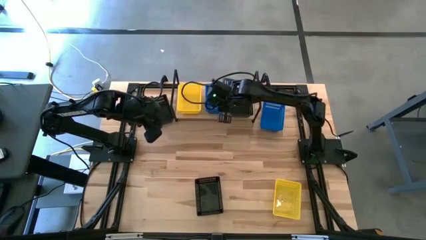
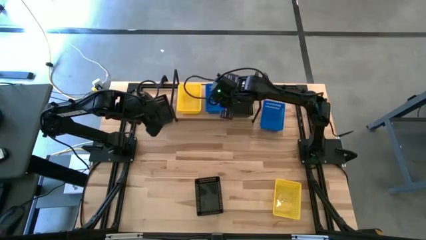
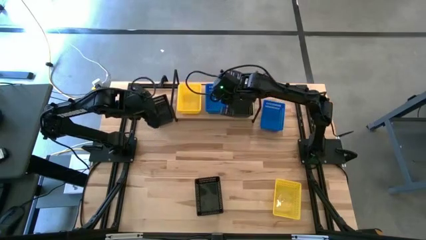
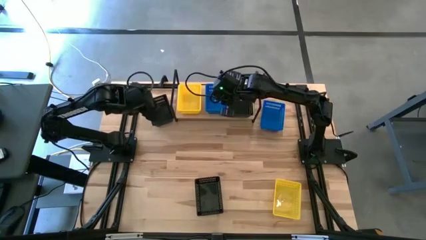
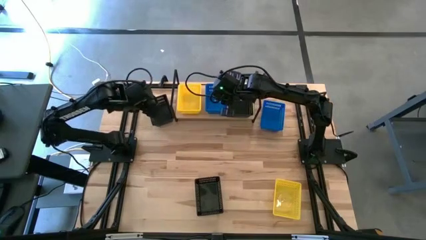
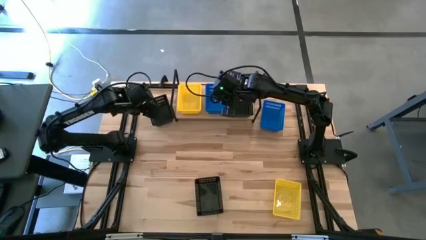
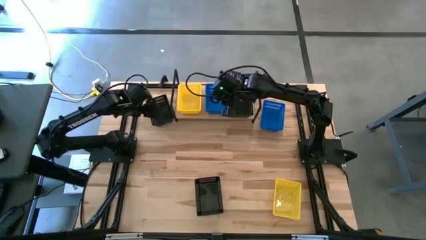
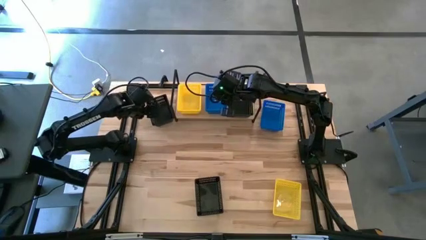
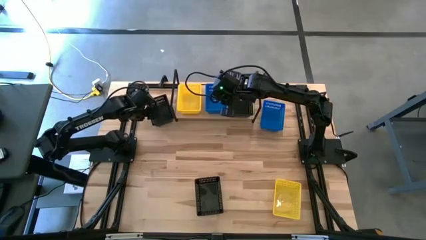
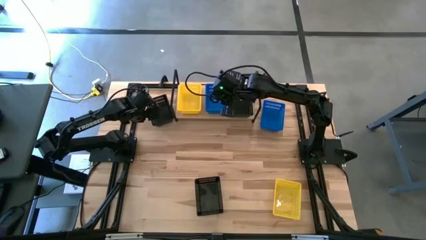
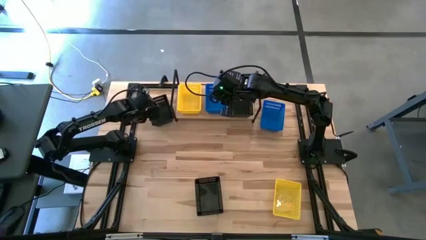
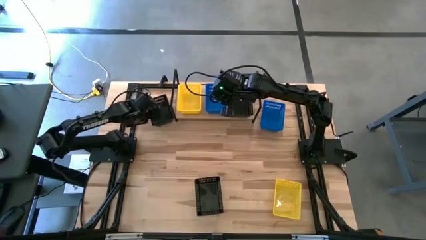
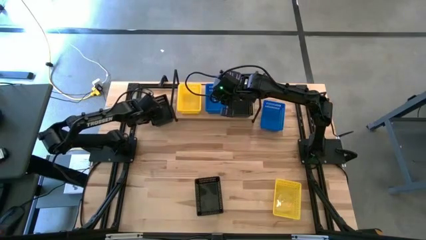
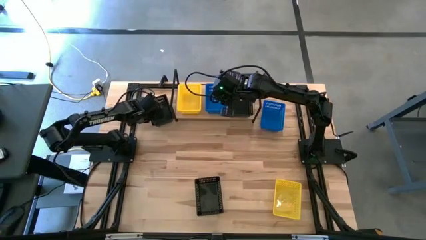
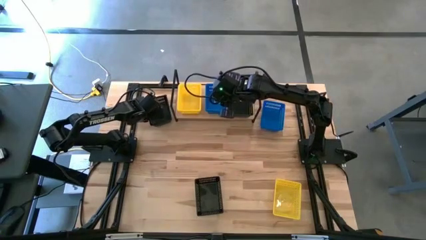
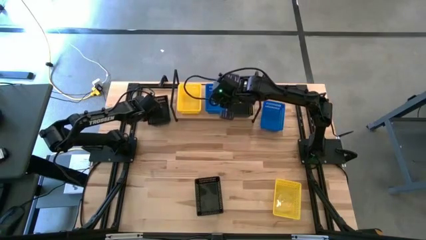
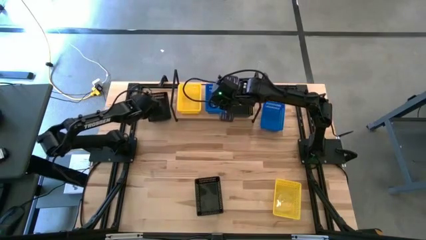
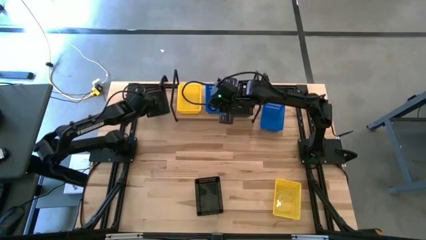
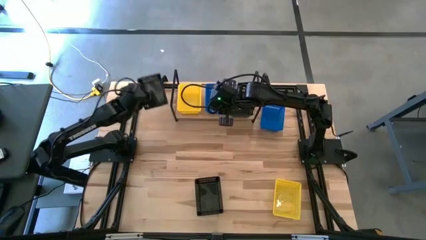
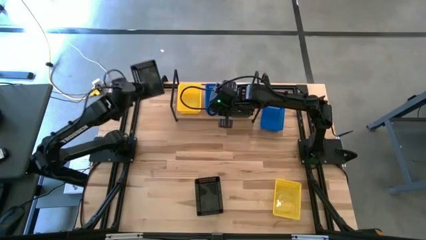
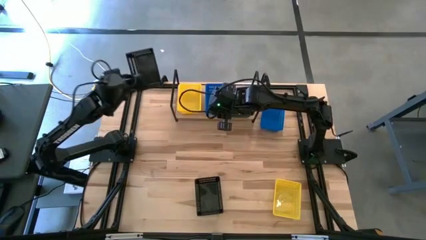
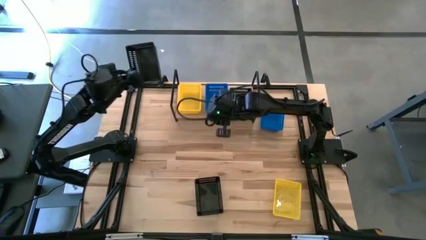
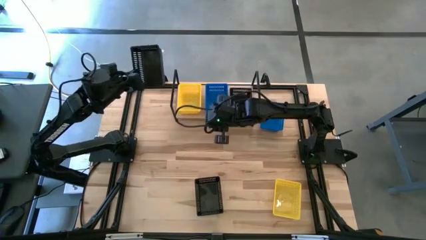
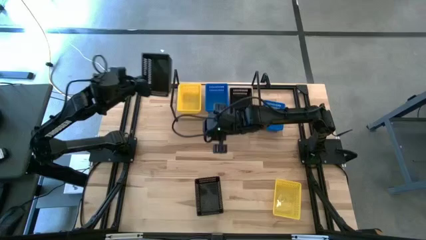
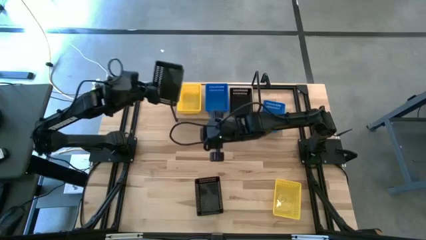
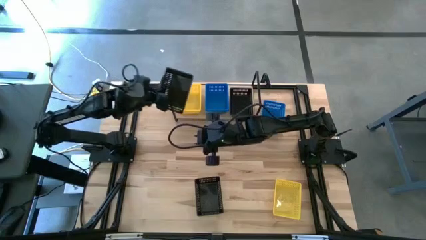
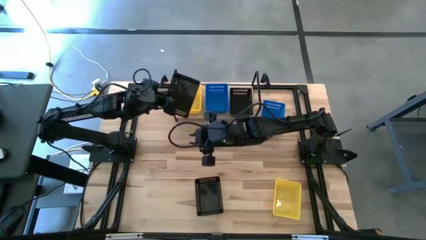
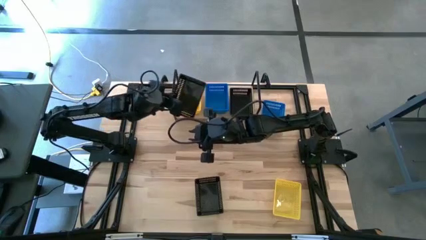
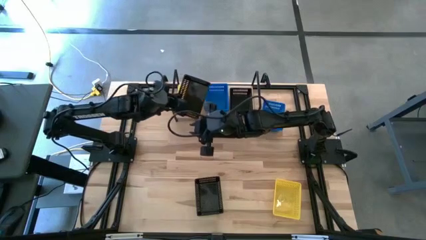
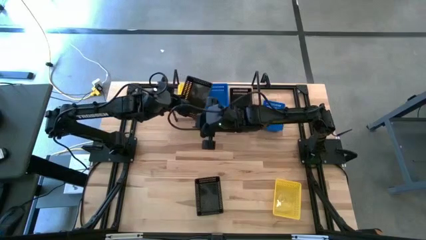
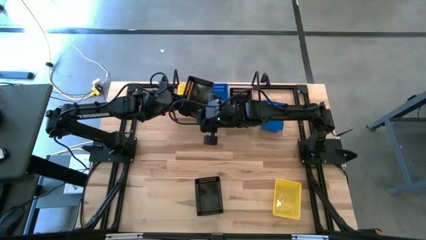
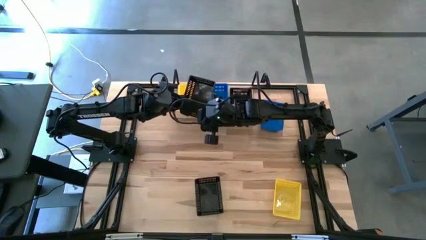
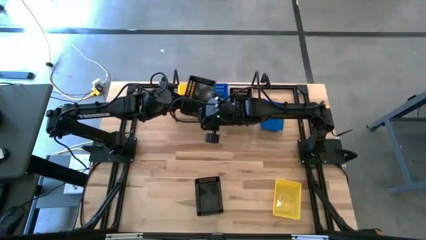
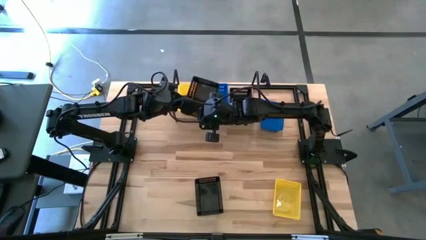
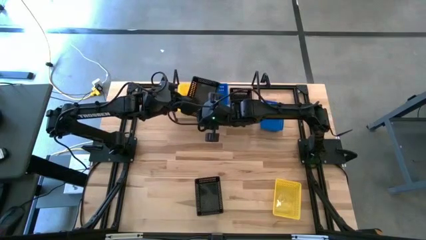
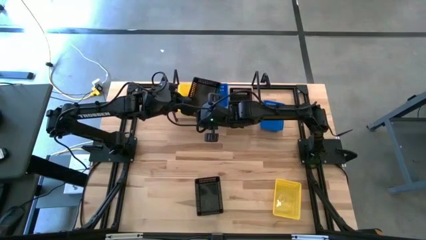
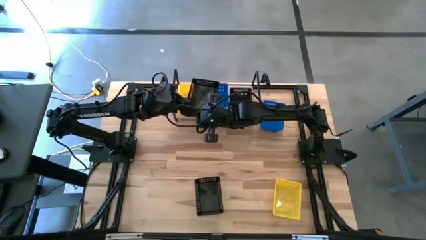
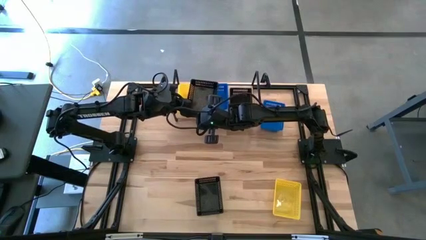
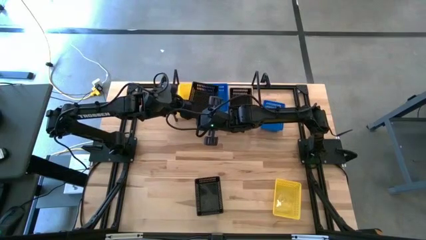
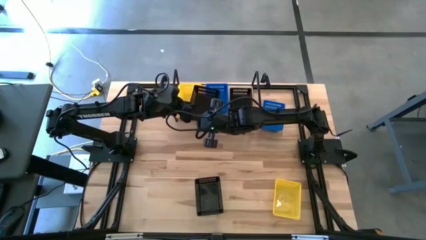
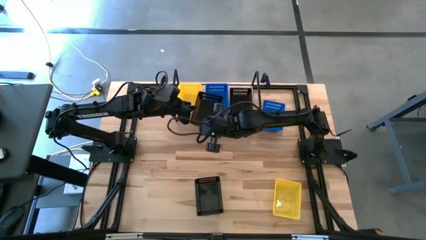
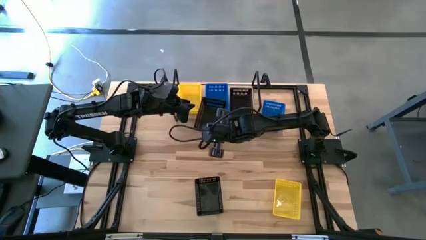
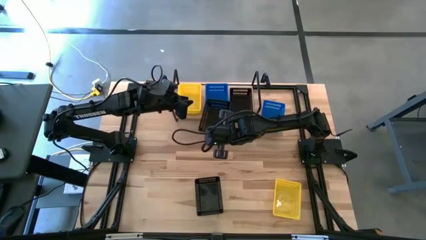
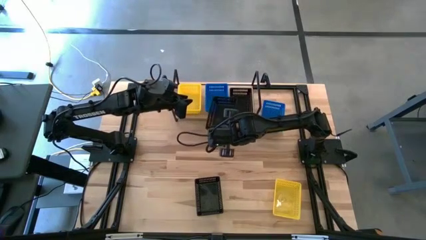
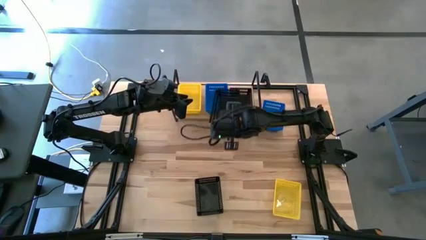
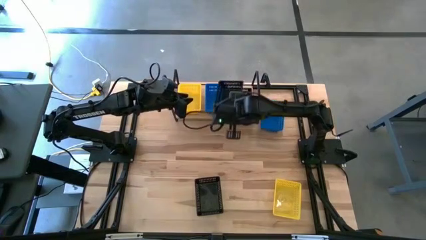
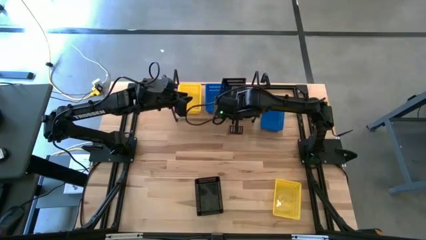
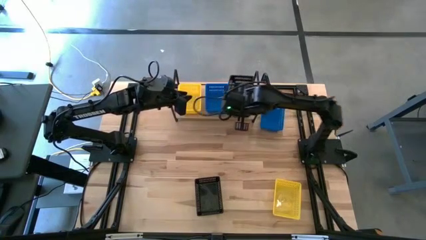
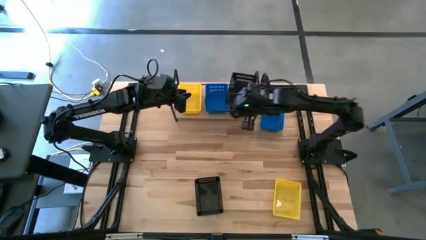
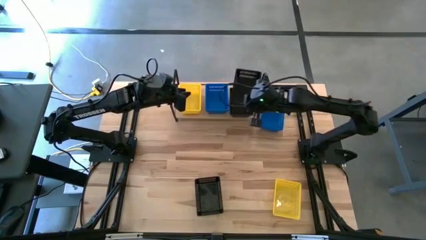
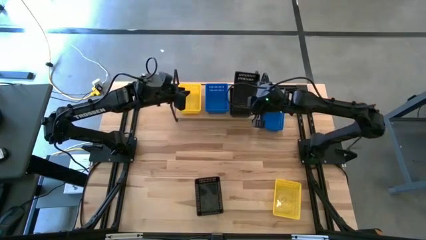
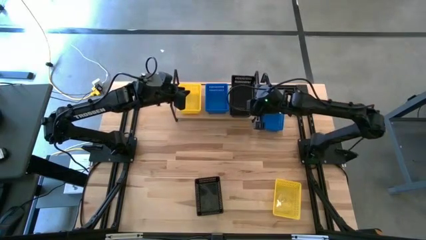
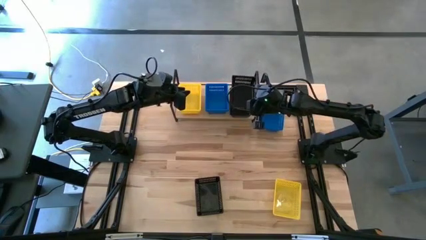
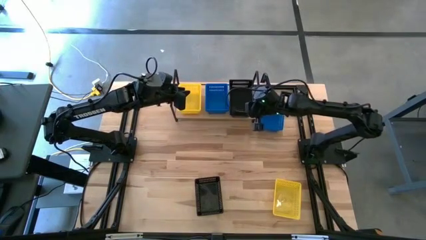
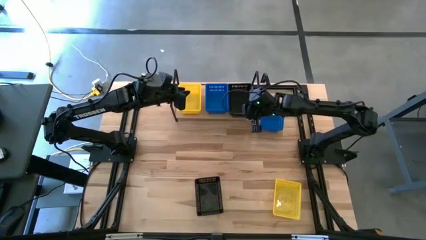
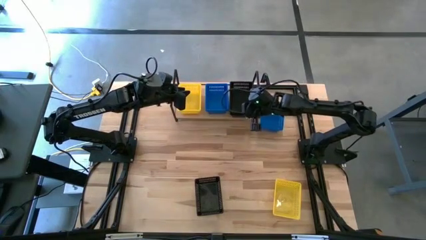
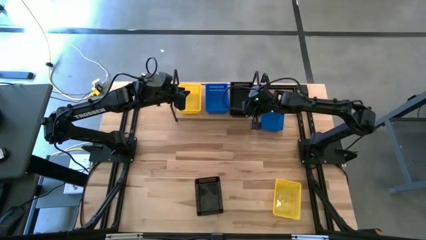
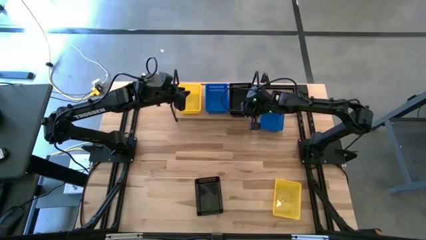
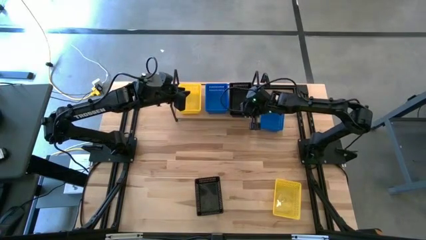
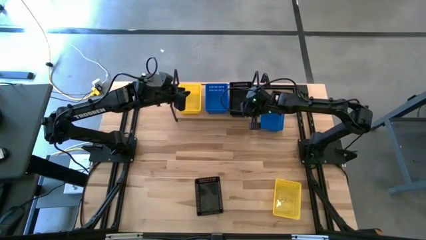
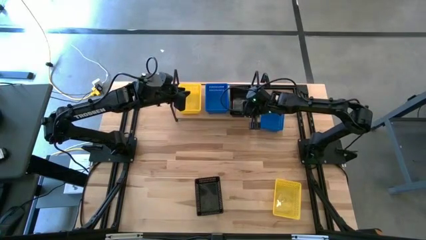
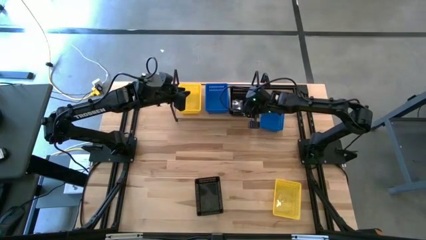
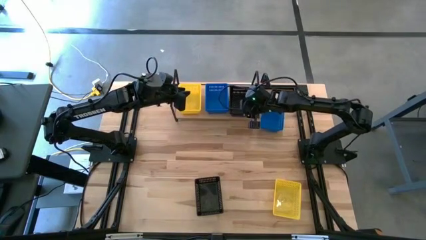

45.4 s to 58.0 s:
Task: Stack baskets on shelf by color
Stack the top black bin on top of the black bin on the shelf

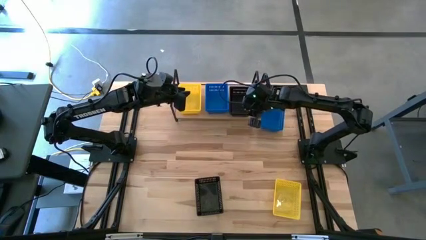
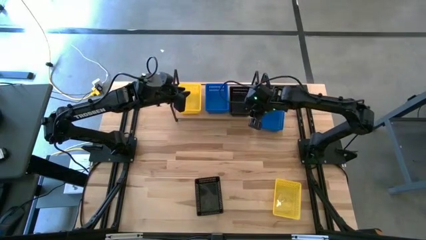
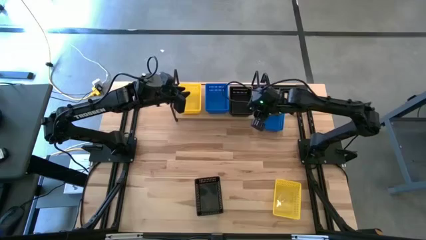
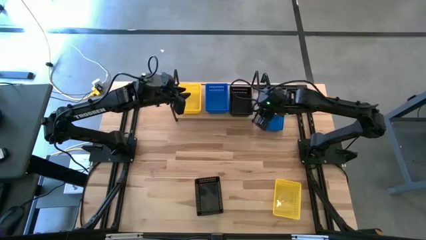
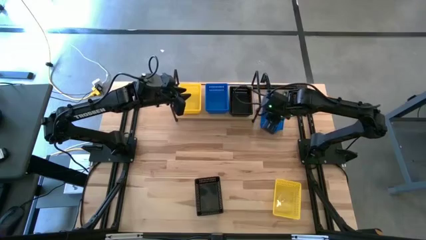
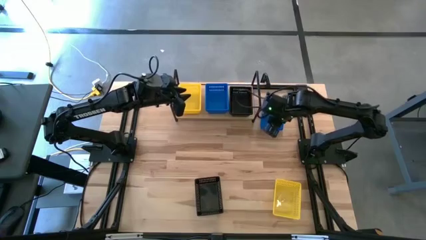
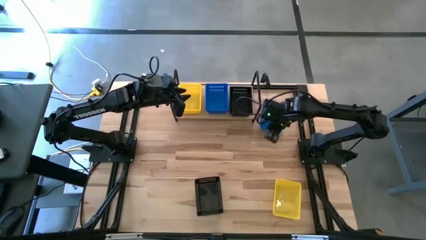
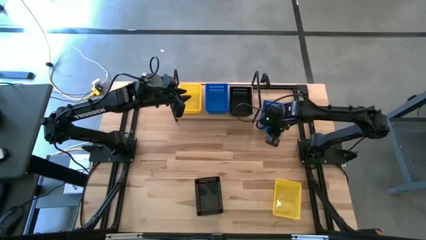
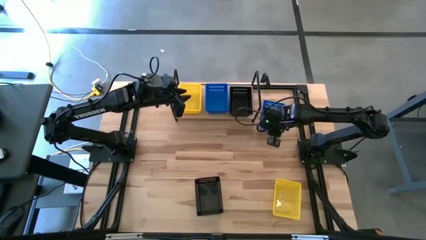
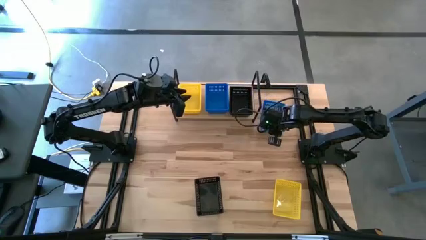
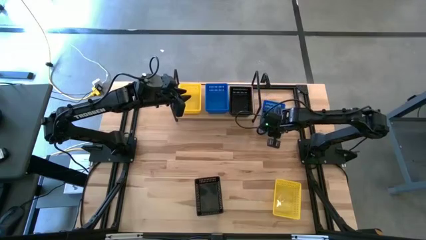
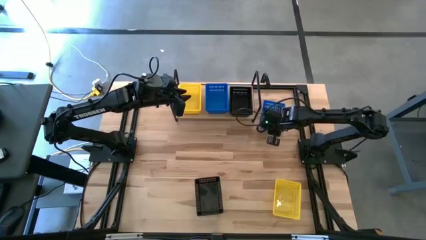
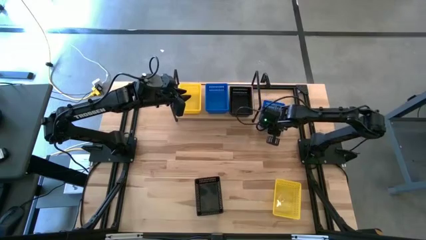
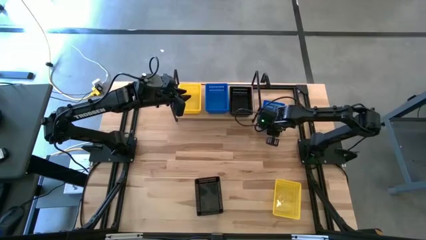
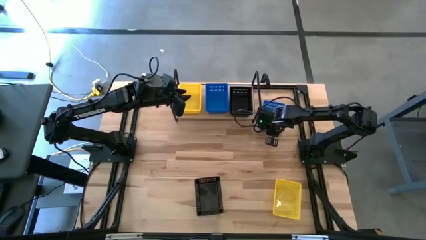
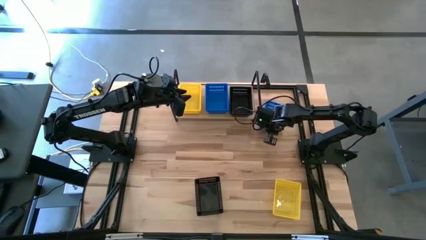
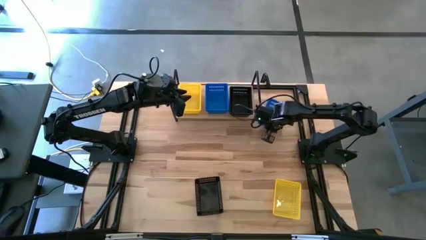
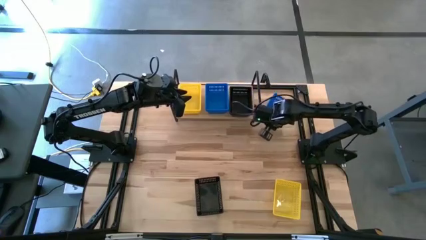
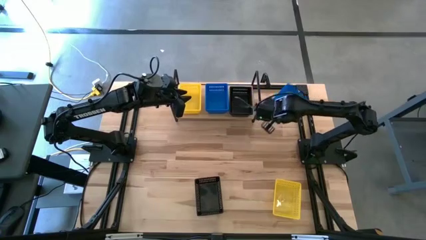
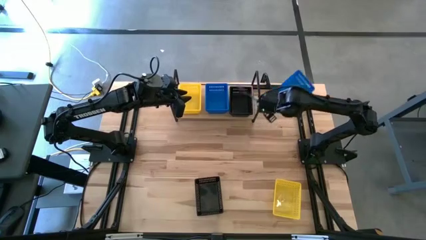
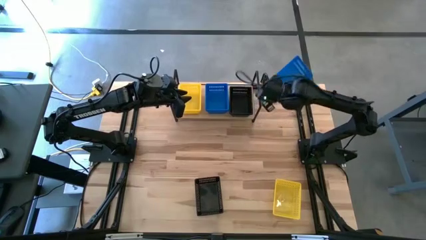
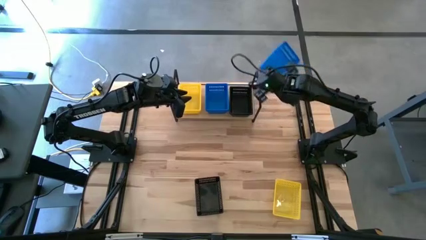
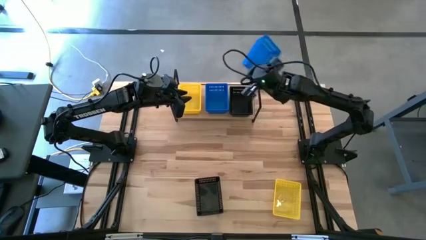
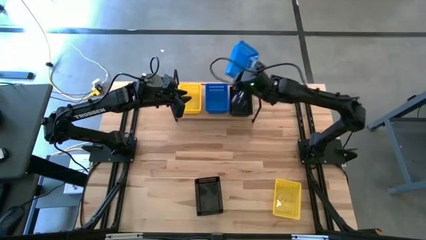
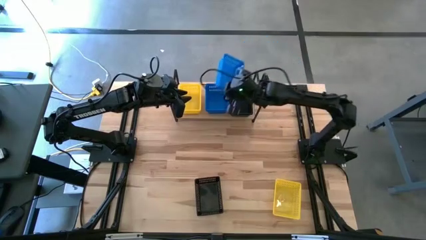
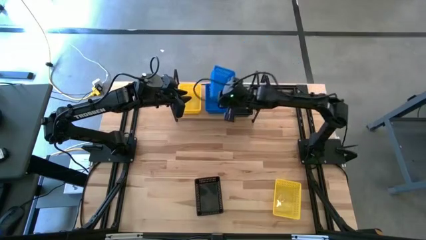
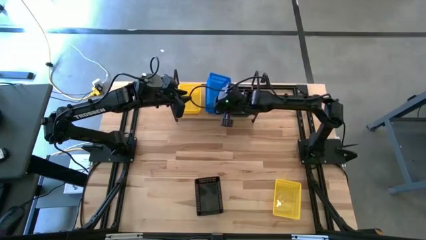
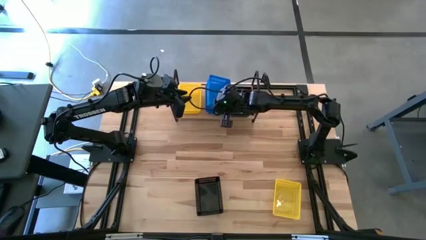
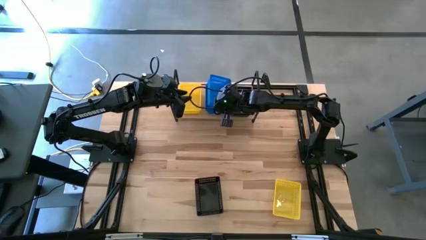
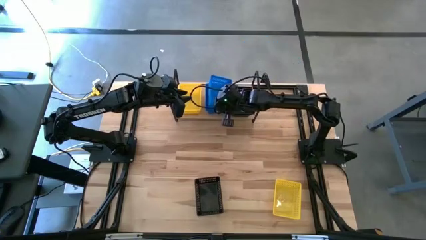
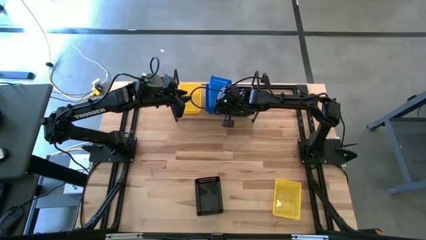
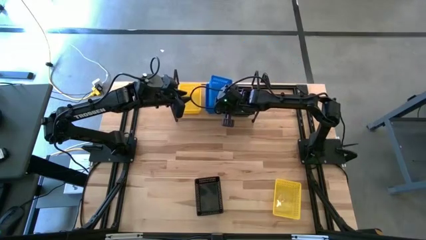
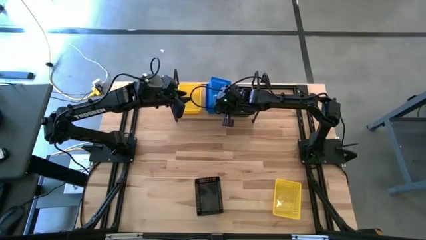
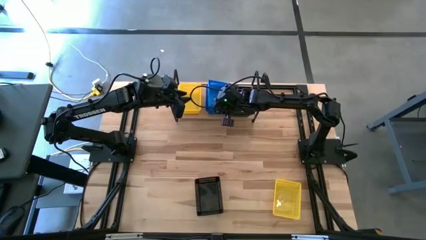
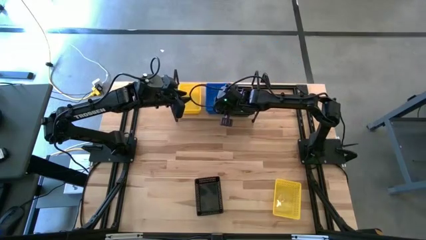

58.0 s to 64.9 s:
Stack the blue bin on top of the blue bin on the shelf
